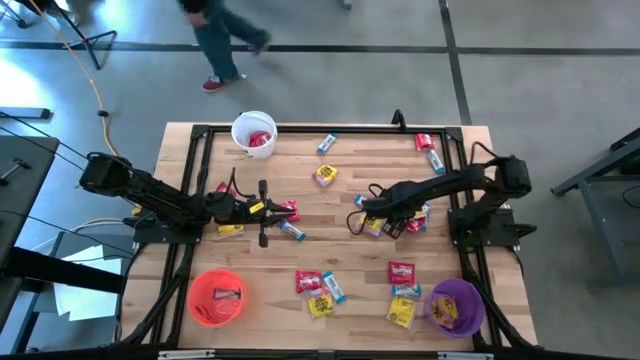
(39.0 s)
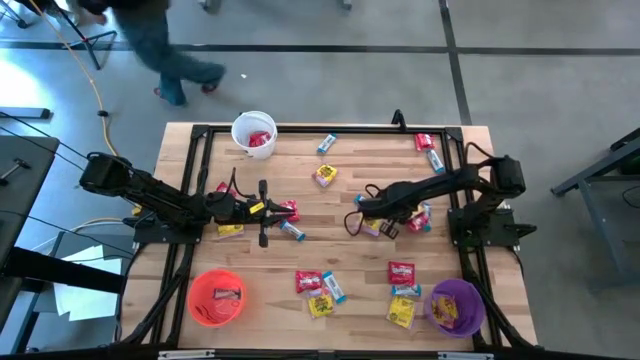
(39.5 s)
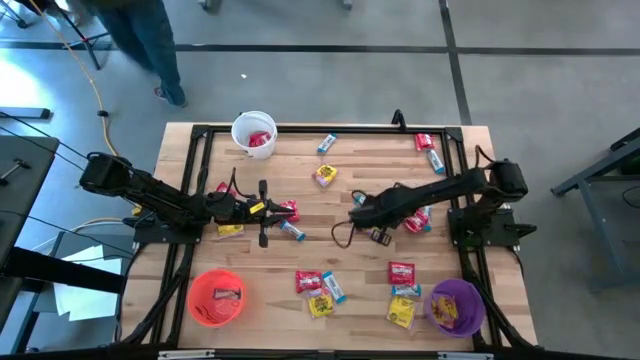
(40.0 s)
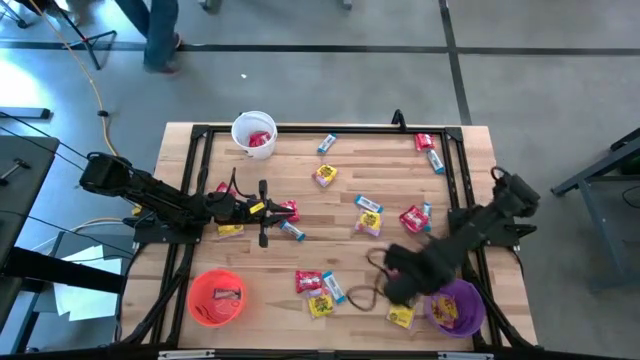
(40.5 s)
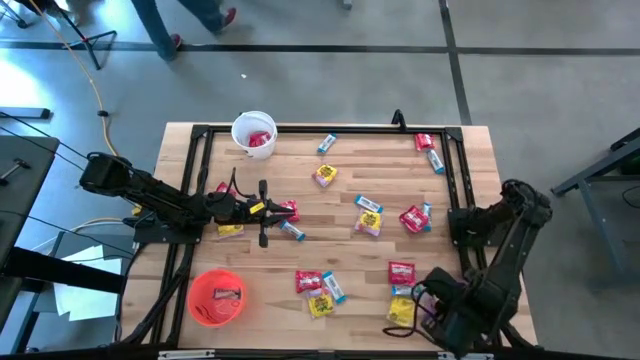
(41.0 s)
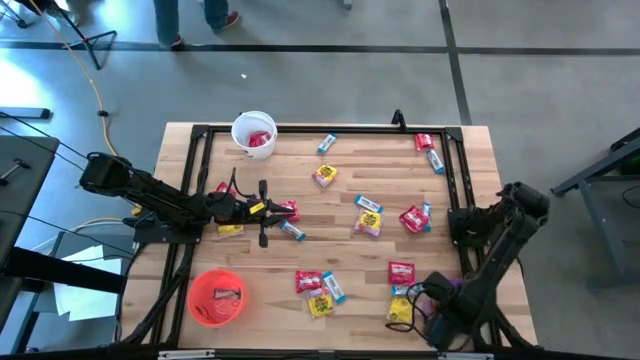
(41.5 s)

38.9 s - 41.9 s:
Task: Sort candy
Put the yellow candy into the purple bucket

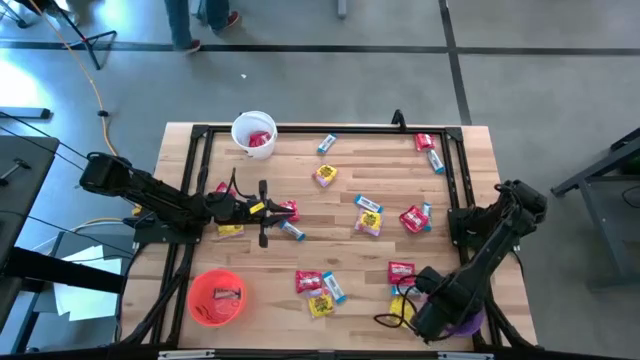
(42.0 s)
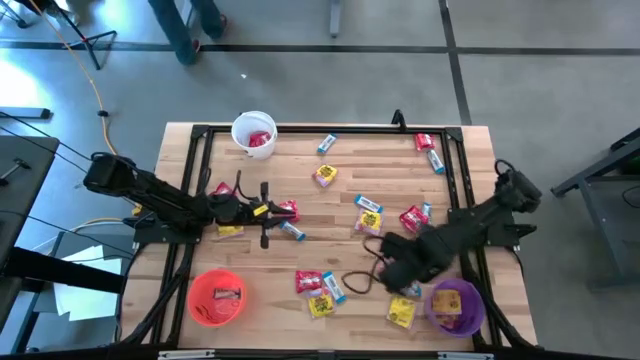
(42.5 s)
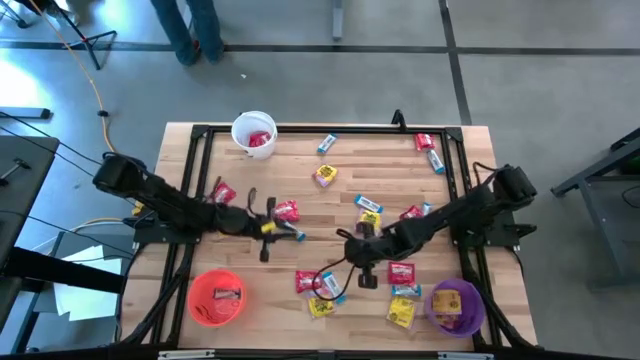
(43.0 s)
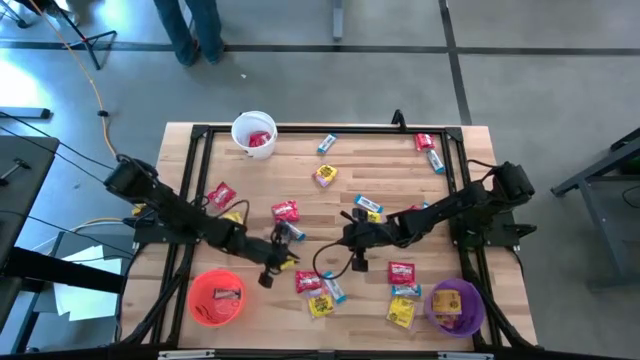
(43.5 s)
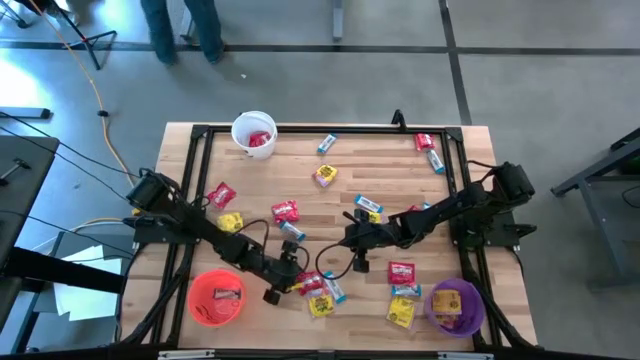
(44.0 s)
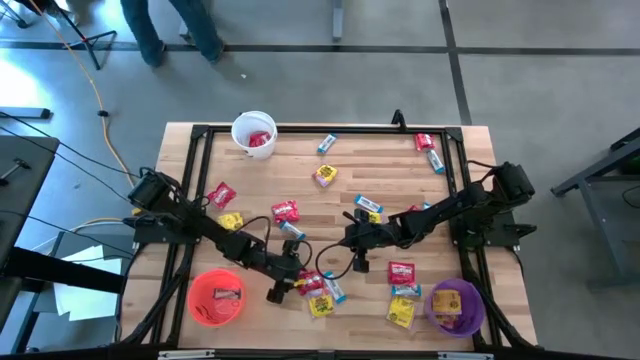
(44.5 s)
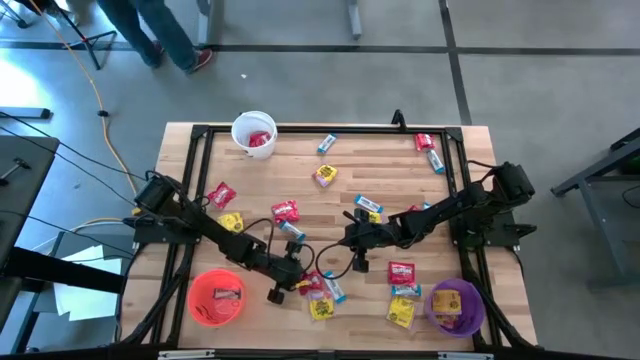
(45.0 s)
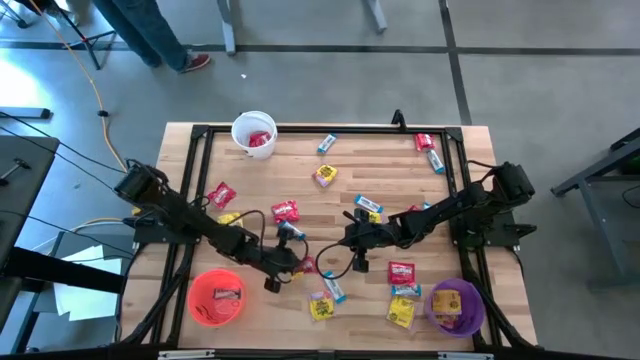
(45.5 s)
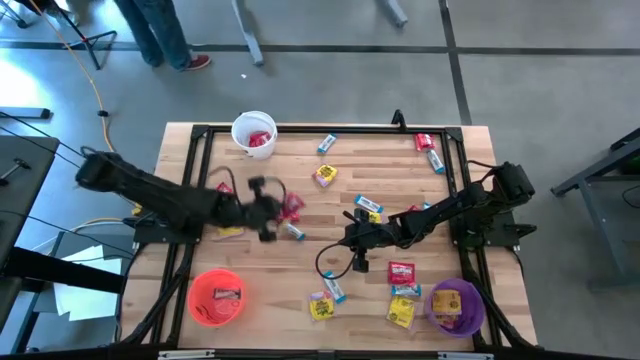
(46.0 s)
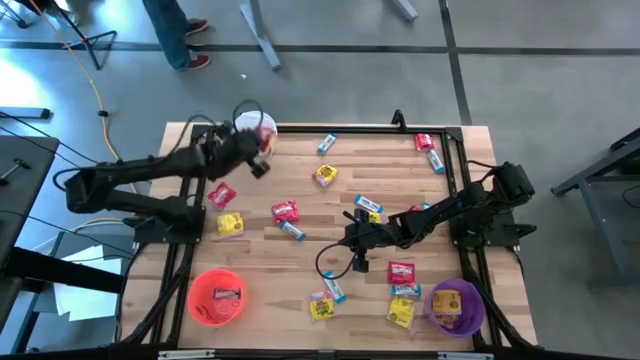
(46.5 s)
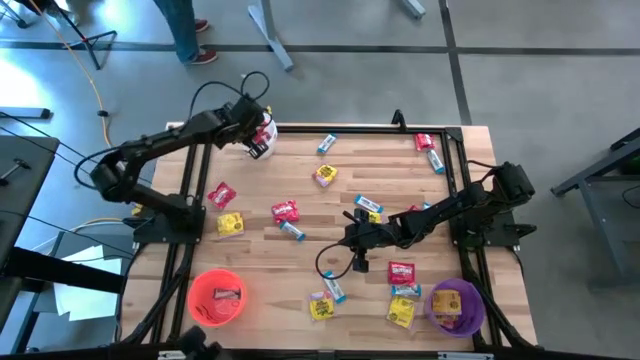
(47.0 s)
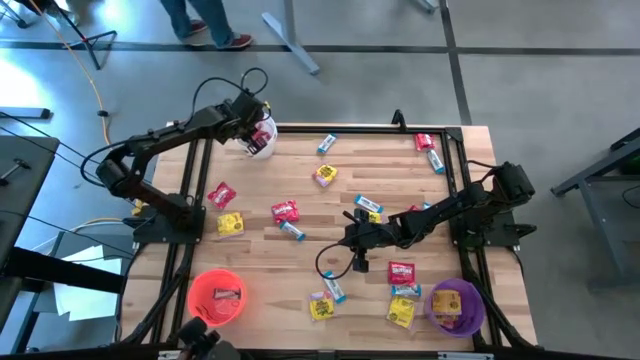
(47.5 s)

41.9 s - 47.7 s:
Put the red candy into the white bucket

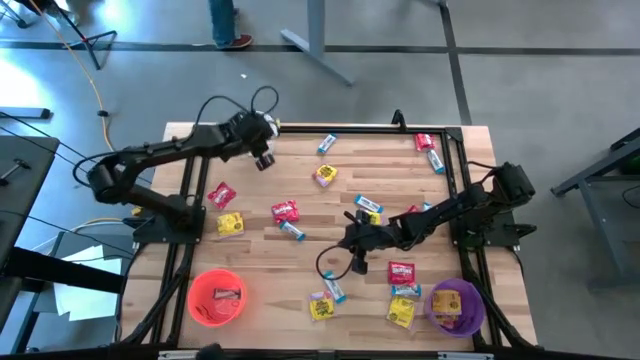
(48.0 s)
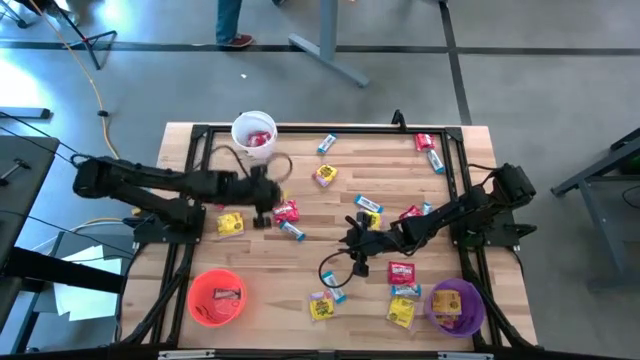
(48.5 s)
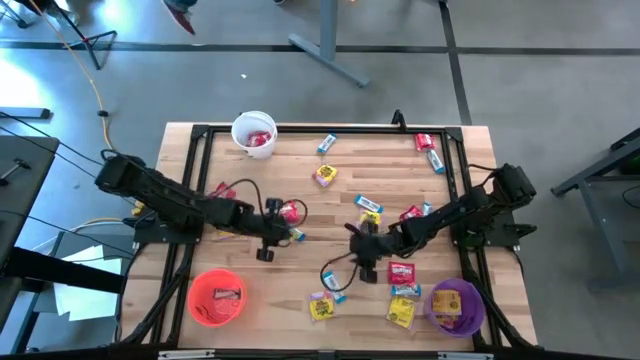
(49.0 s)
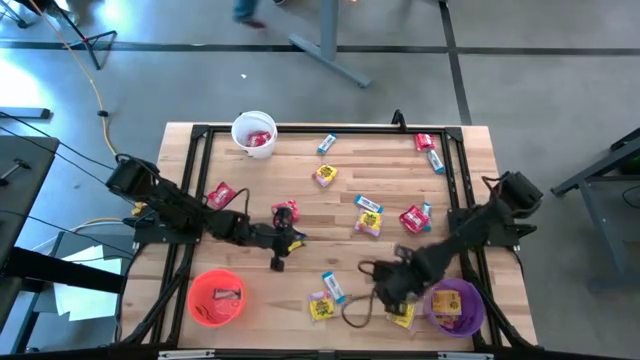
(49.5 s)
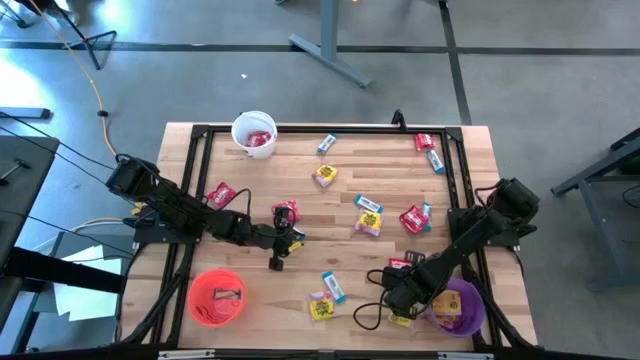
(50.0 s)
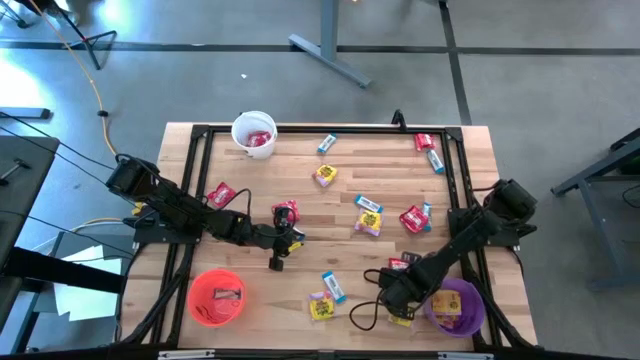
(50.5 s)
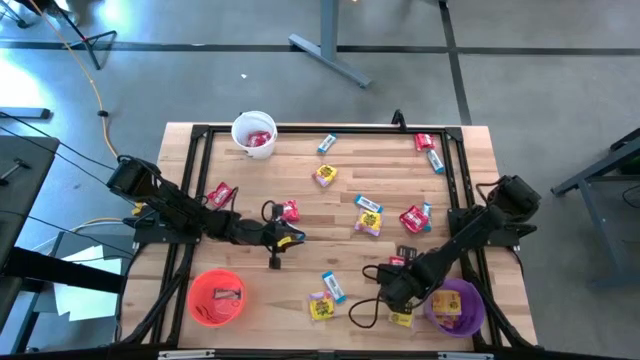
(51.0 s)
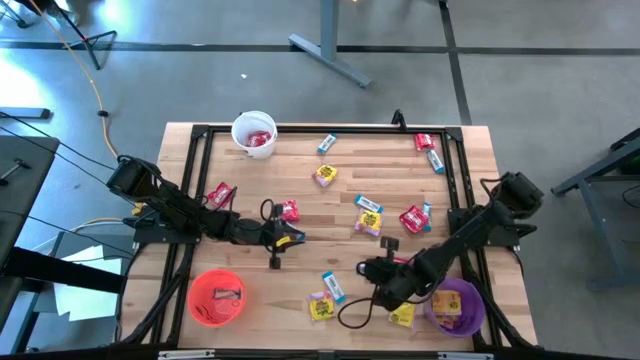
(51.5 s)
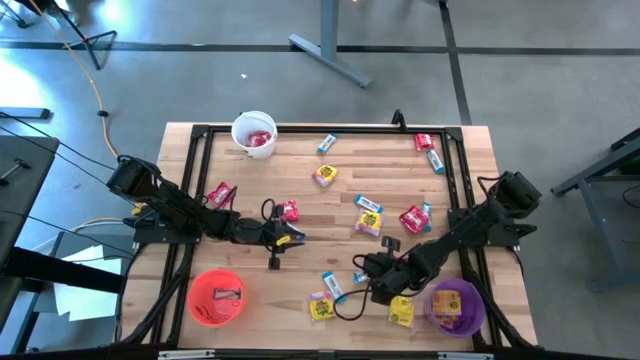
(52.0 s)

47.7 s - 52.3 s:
Put the white candy into the orange bucket

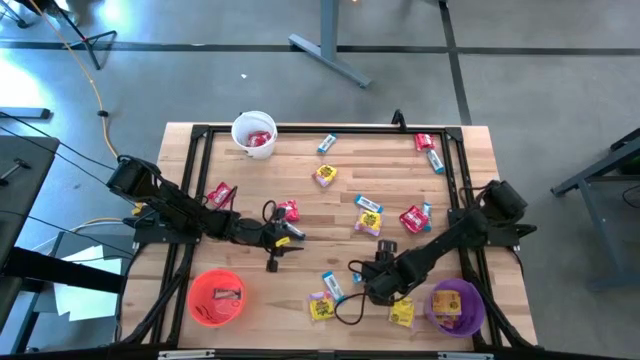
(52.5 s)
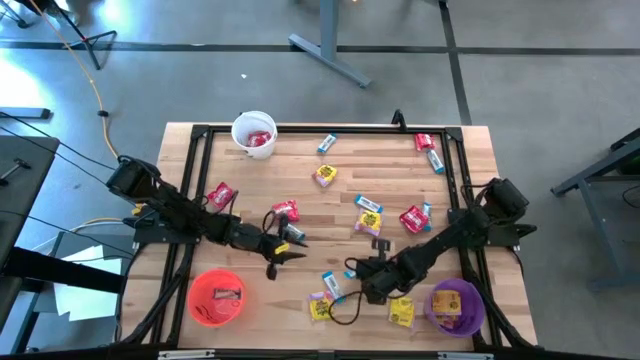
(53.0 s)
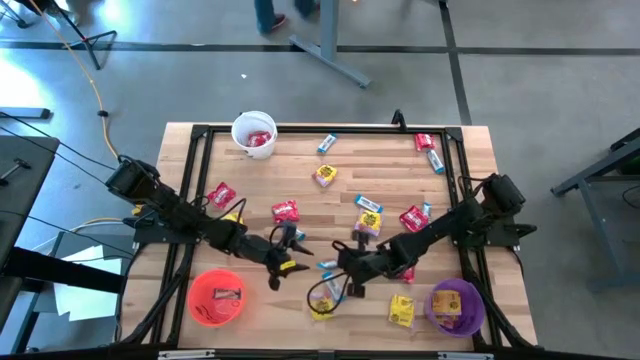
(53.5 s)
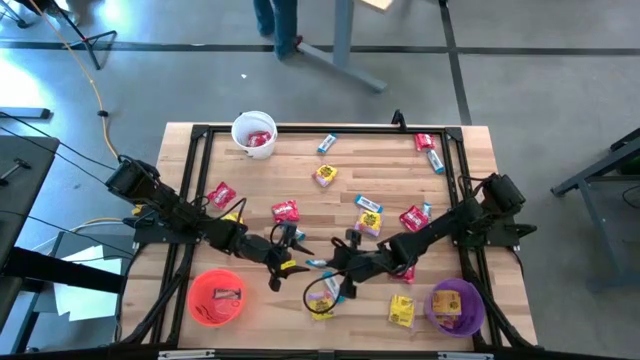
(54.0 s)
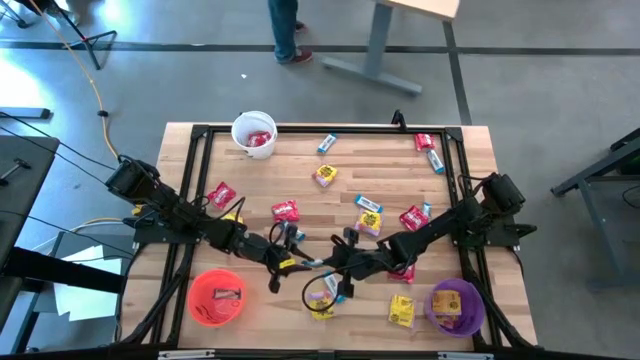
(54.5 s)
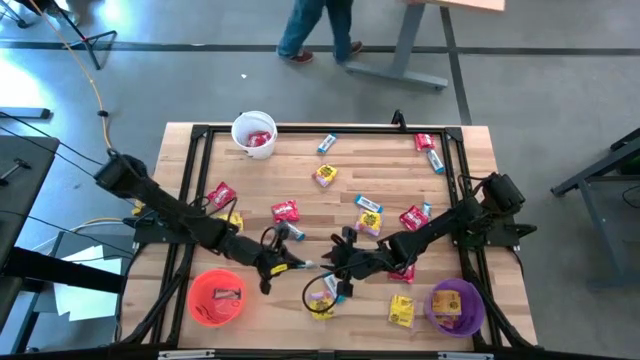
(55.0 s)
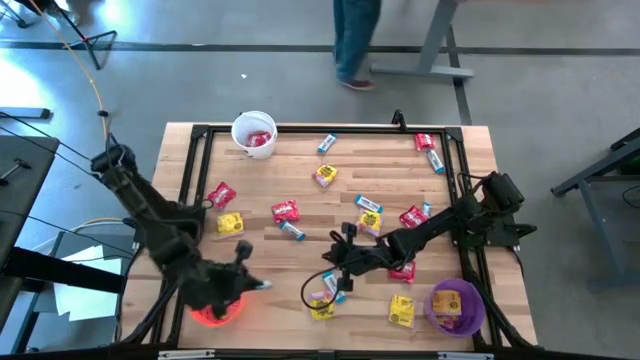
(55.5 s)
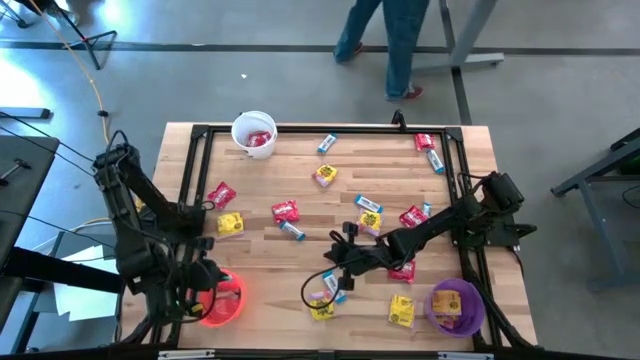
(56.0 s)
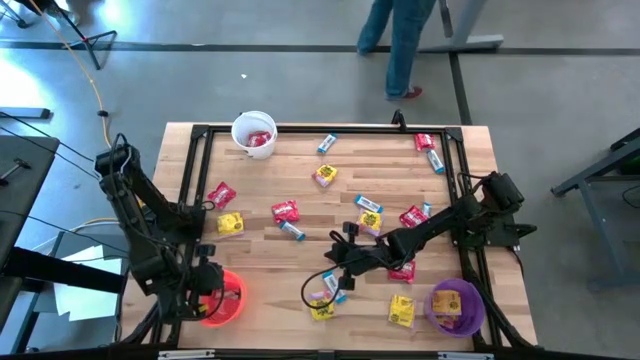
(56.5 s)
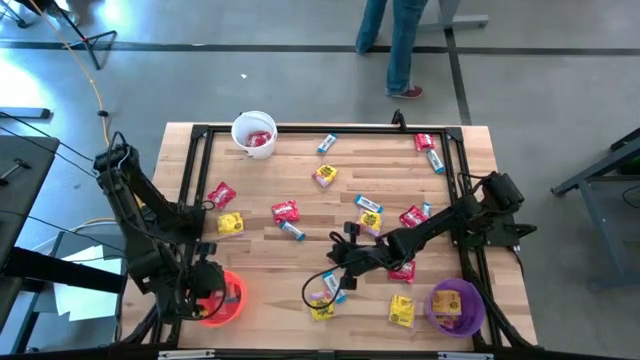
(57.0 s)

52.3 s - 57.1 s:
Put the white candy into the orange bucket

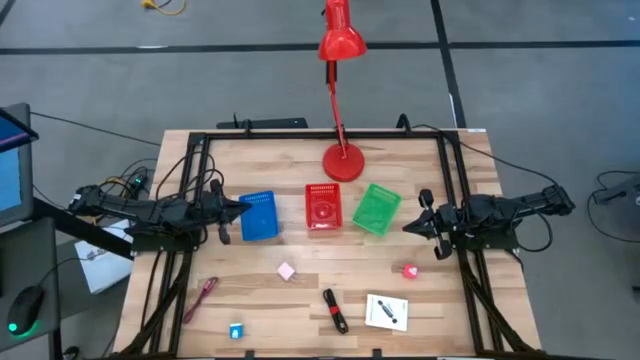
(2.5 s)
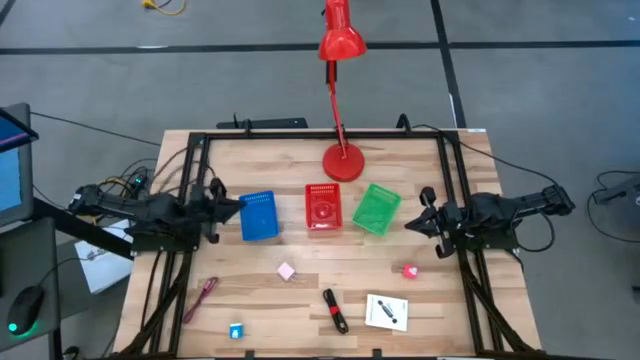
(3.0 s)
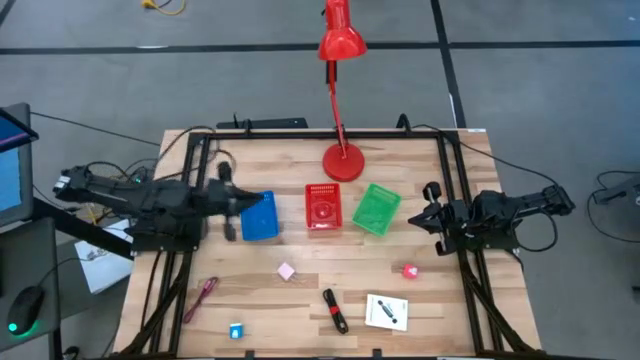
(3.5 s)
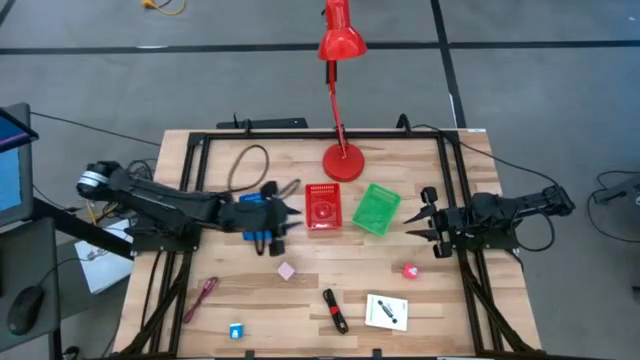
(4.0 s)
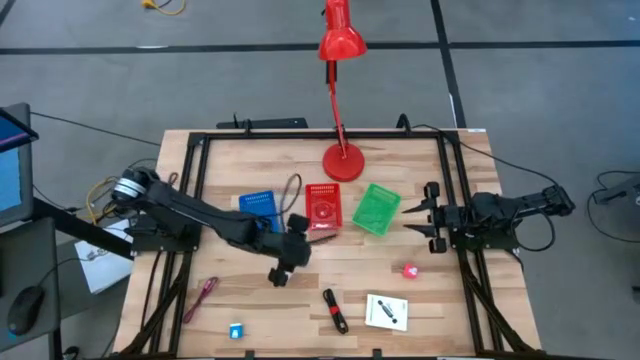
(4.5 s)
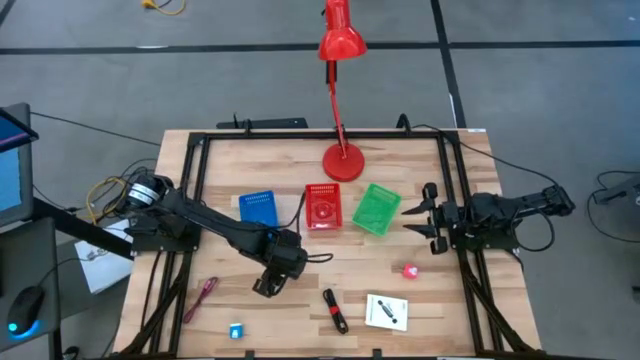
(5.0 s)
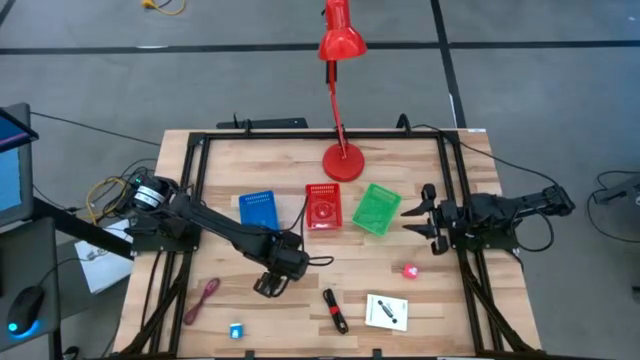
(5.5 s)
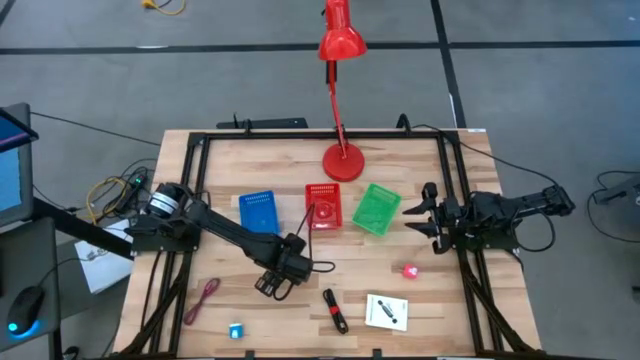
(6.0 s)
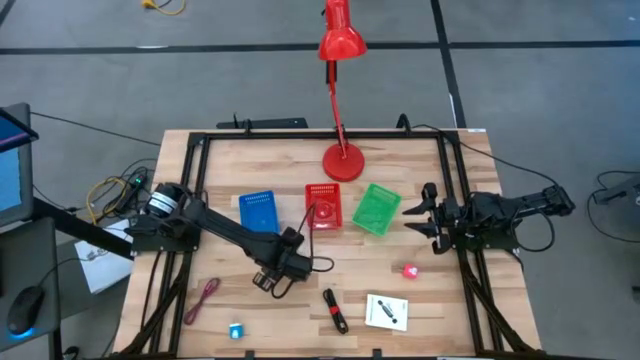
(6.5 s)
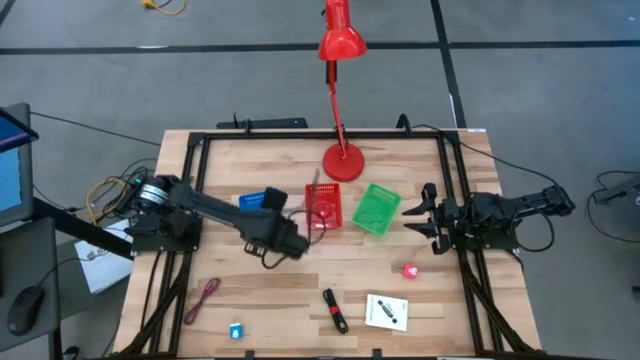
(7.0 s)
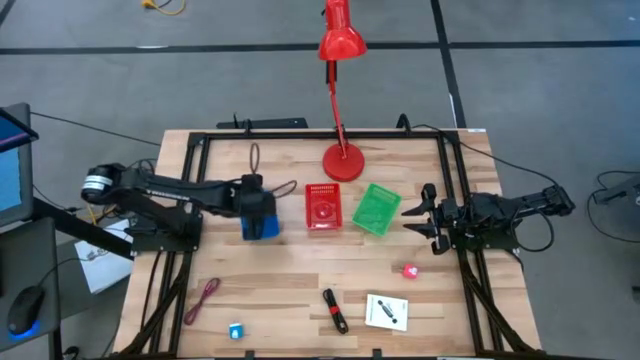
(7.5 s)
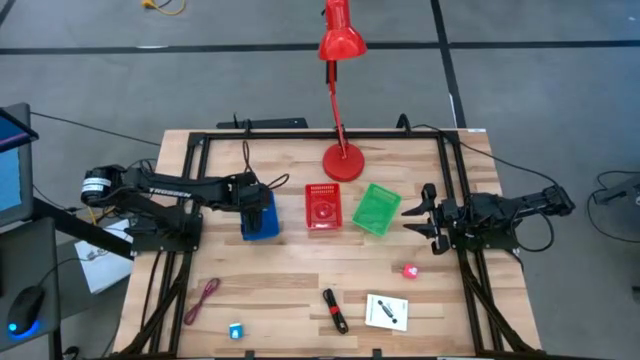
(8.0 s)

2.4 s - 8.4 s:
Task: Pick and place items into bin
Put the white charger adapter into the blue bin
